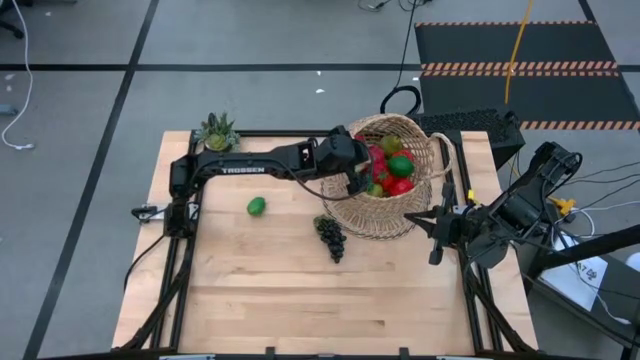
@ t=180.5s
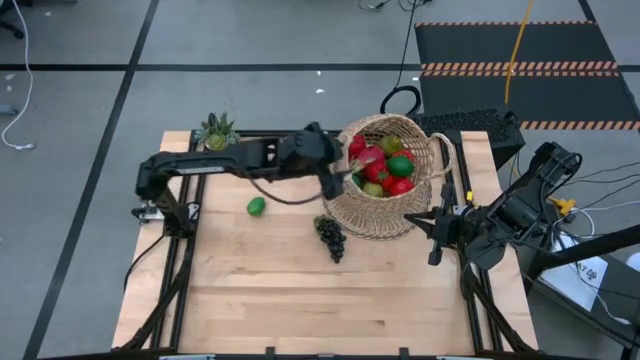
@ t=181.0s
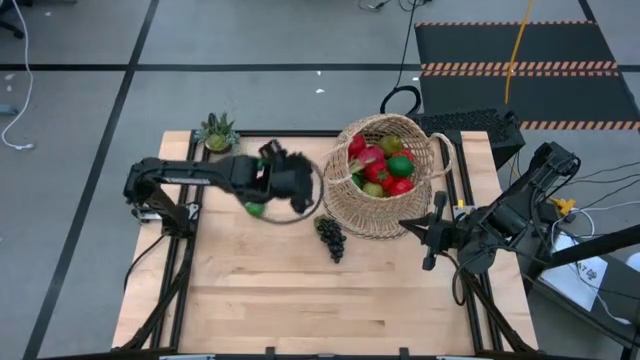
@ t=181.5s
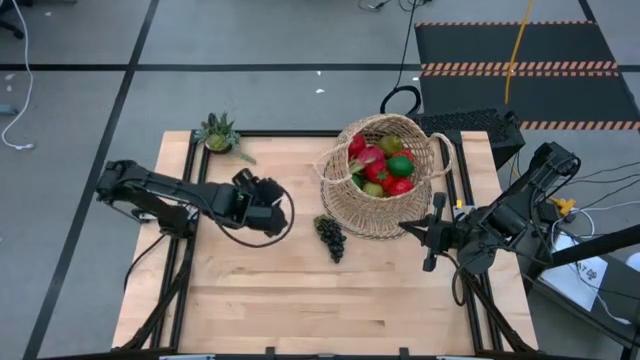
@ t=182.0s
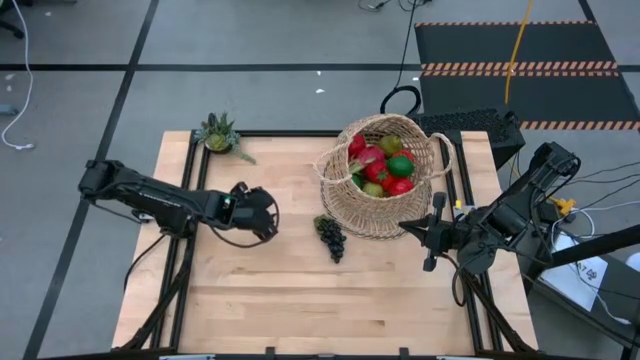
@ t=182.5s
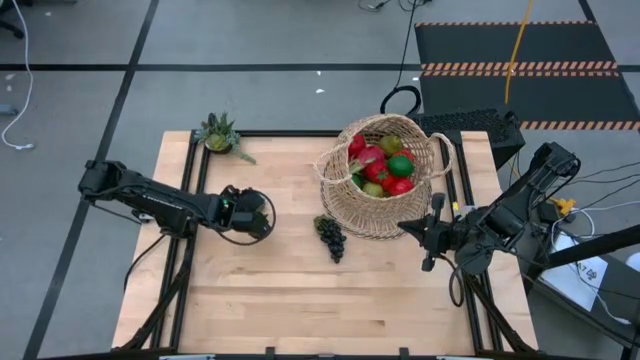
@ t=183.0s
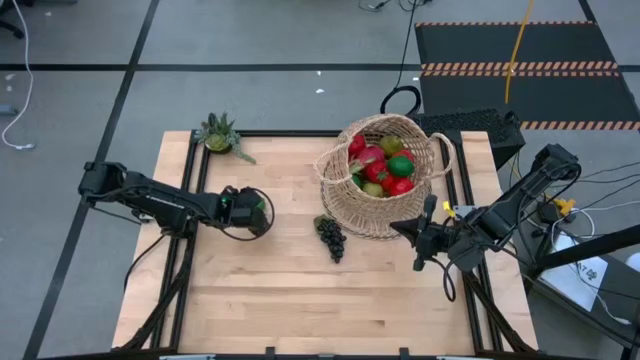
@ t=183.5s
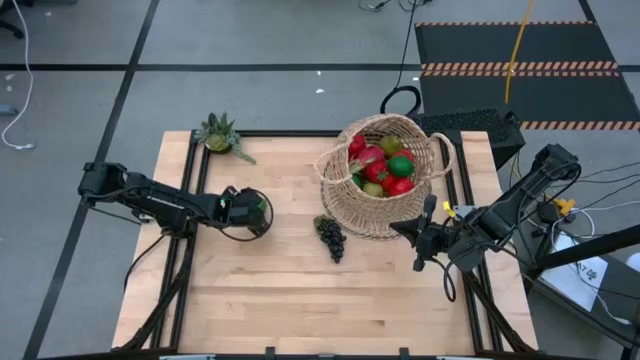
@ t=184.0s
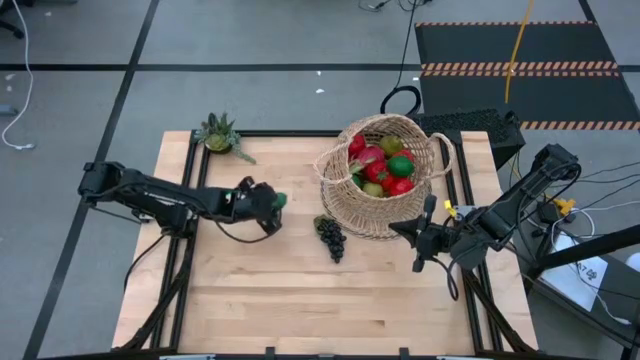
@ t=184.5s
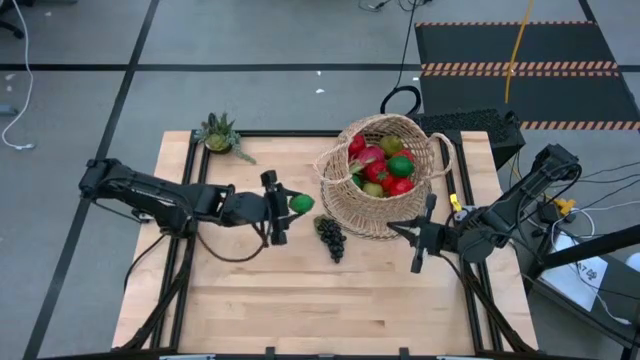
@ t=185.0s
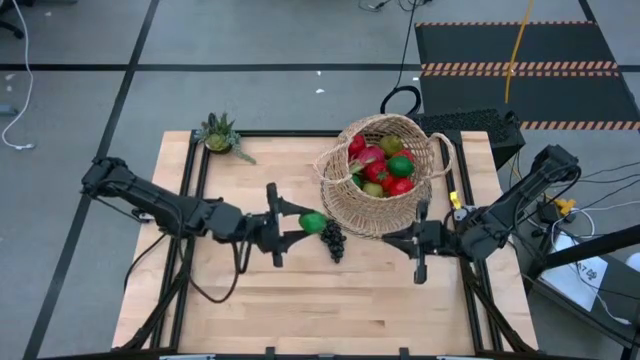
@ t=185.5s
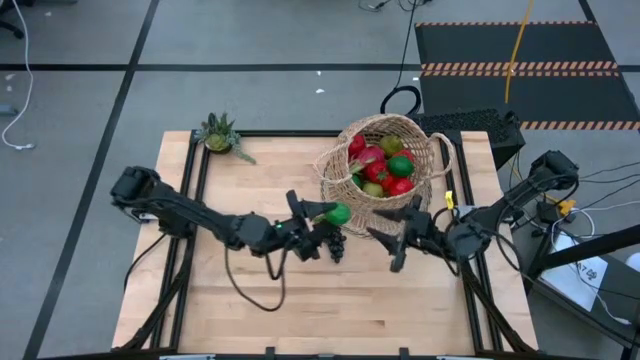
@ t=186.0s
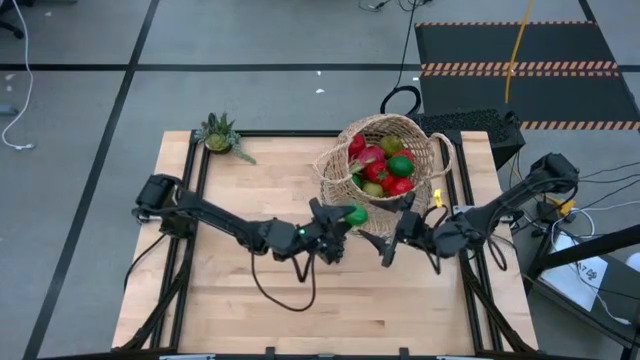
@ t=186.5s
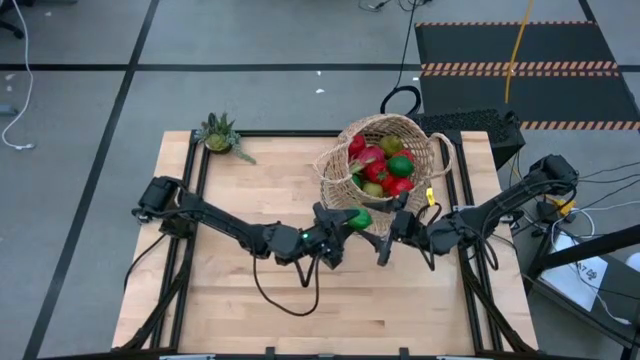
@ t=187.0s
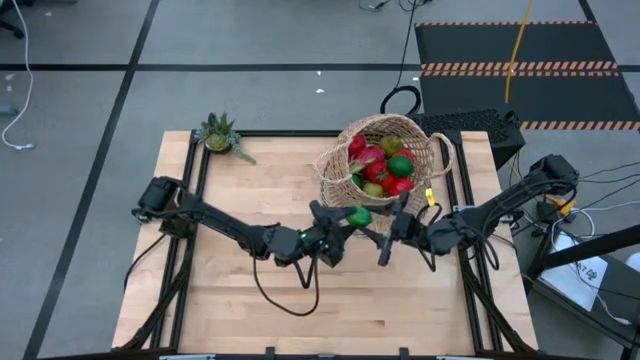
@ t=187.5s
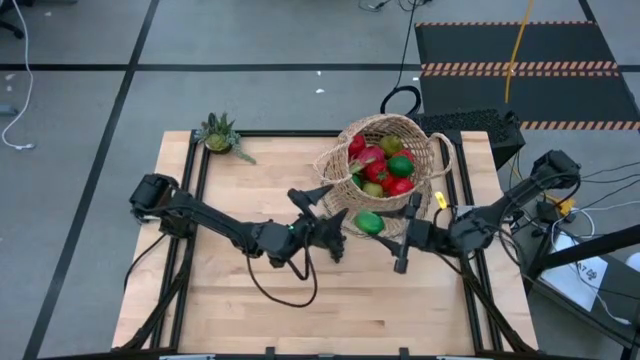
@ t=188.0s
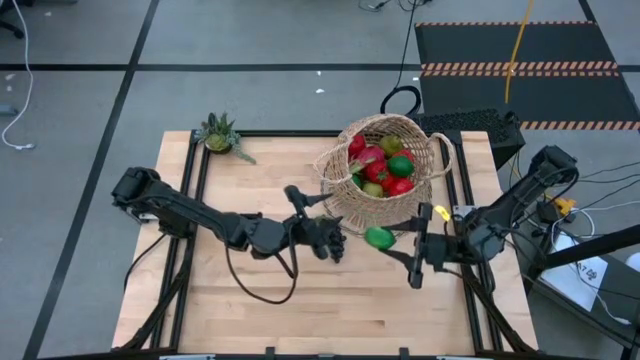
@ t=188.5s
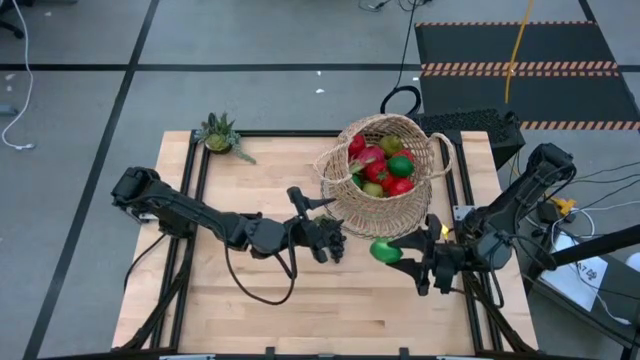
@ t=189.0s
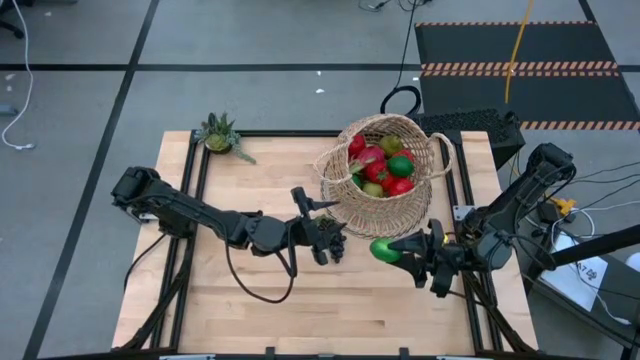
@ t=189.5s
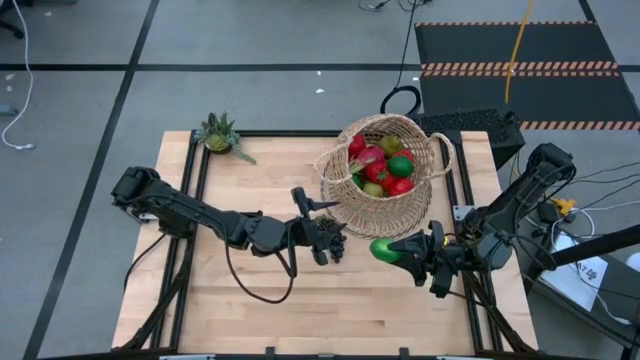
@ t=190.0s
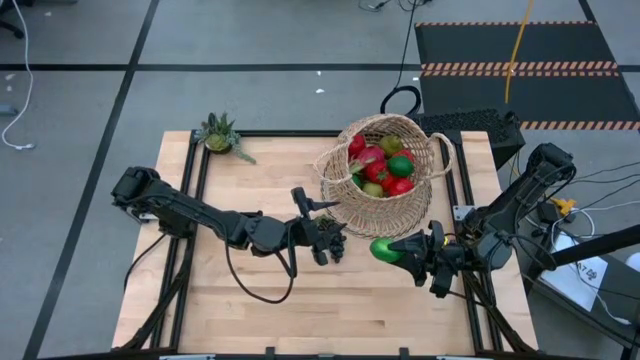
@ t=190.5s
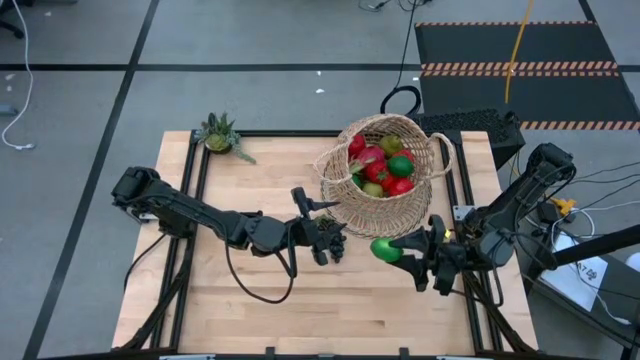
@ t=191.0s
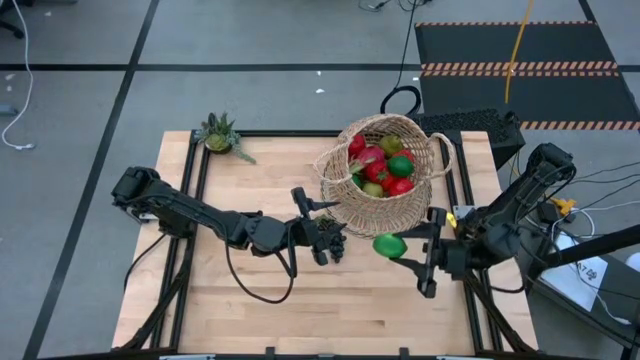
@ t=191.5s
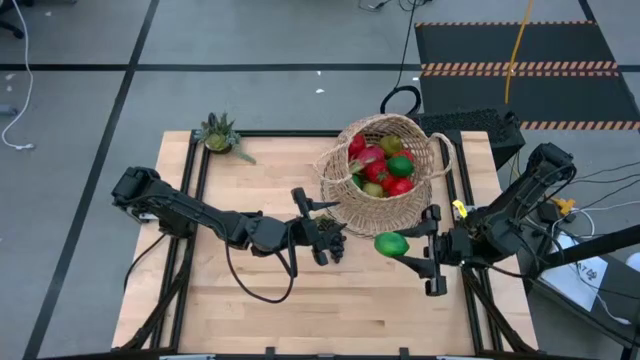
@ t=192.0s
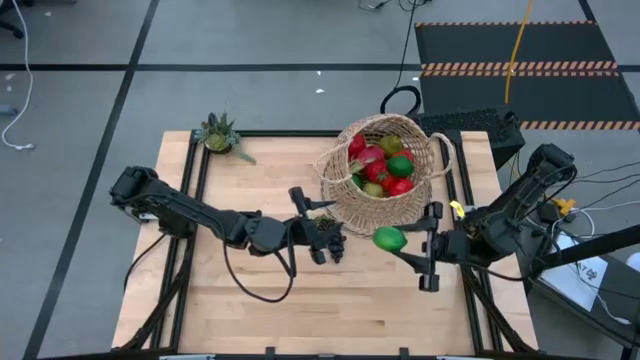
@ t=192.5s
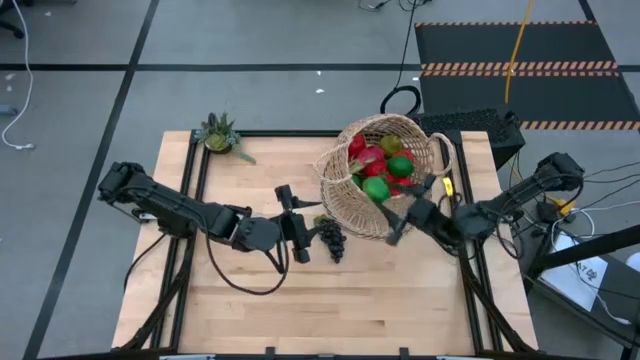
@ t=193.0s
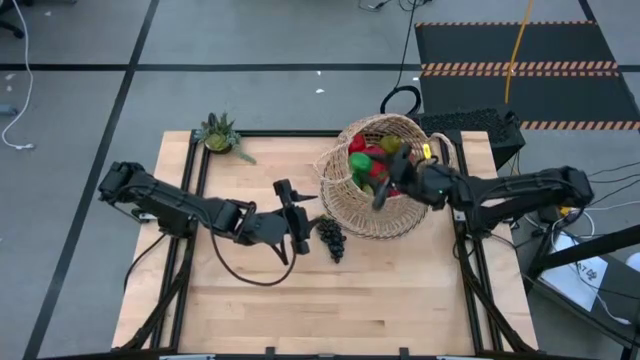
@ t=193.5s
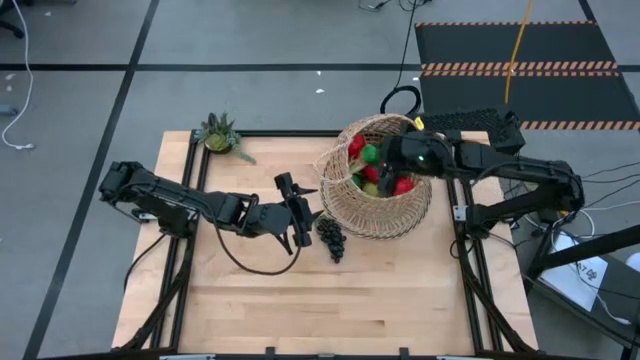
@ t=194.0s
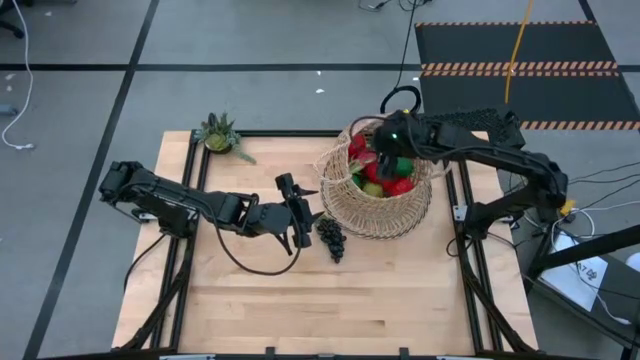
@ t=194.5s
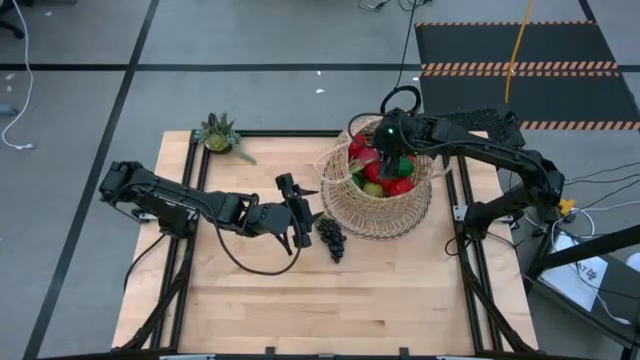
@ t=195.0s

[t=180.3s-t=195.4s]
Task: Build produce basket
Put the green lime into the brown basket

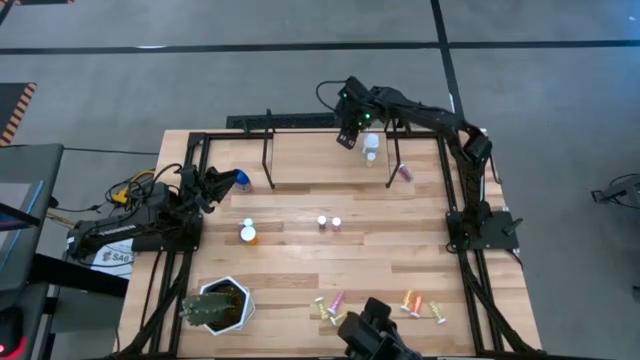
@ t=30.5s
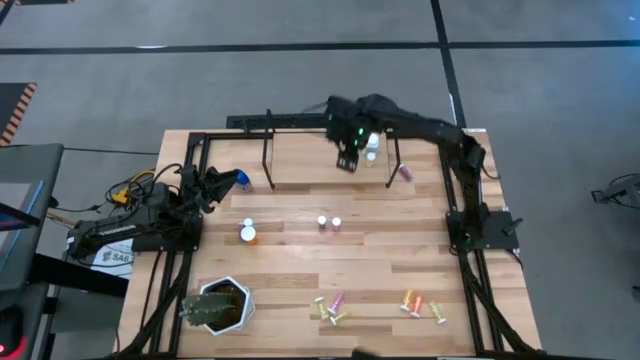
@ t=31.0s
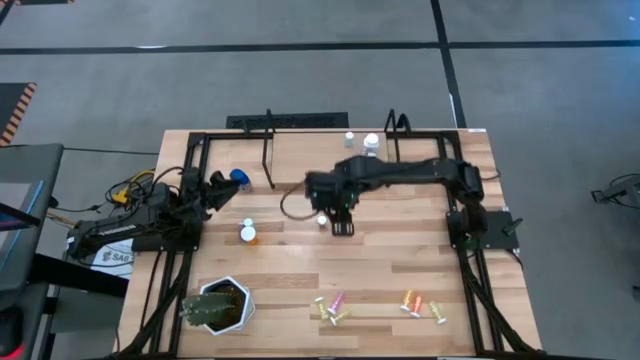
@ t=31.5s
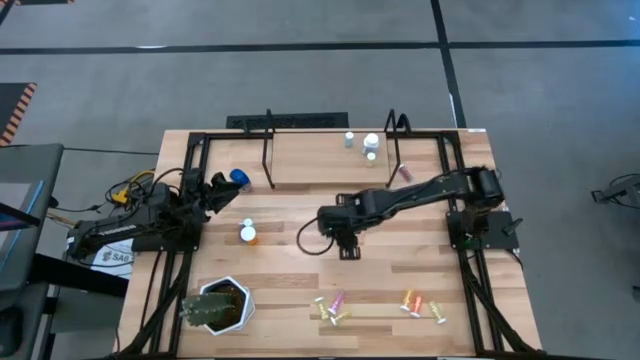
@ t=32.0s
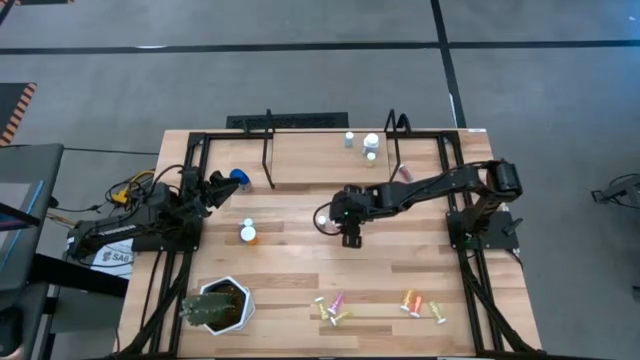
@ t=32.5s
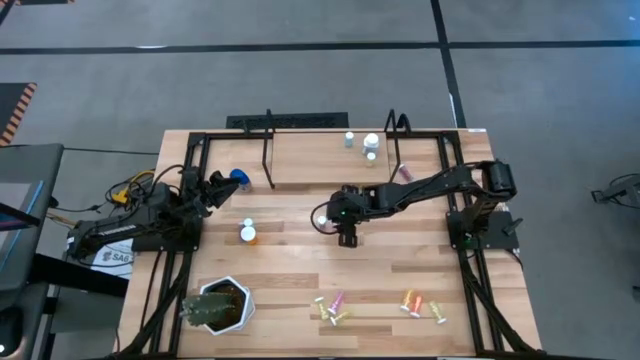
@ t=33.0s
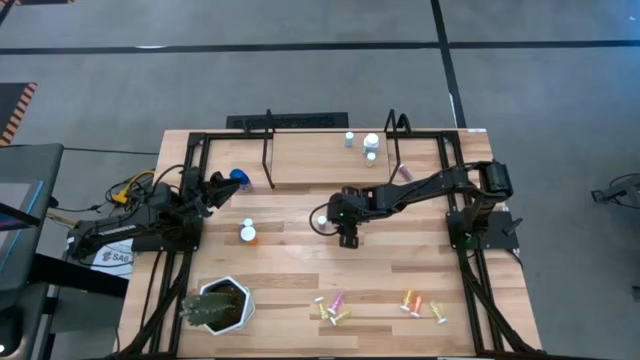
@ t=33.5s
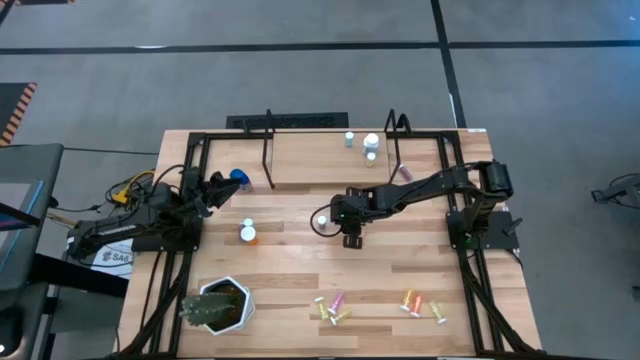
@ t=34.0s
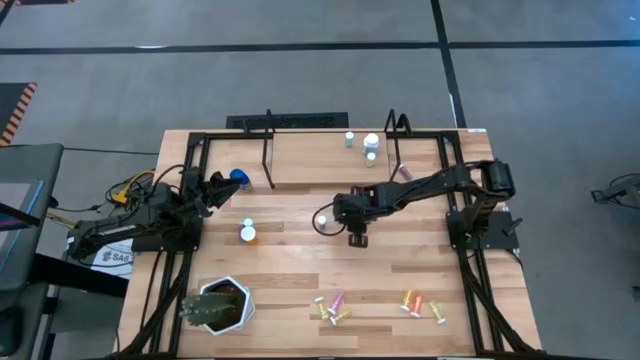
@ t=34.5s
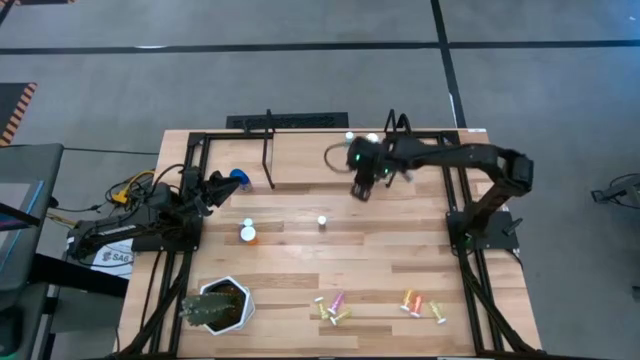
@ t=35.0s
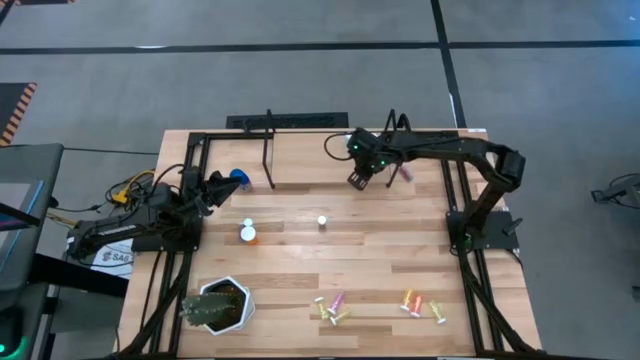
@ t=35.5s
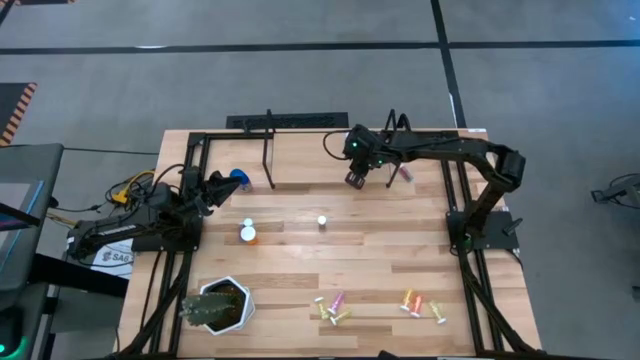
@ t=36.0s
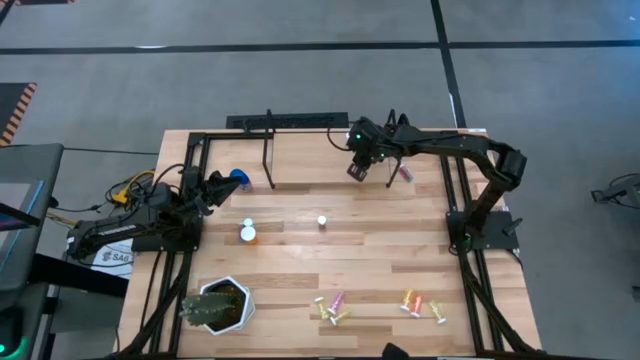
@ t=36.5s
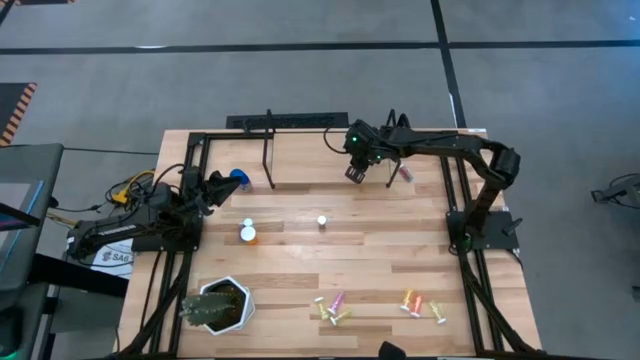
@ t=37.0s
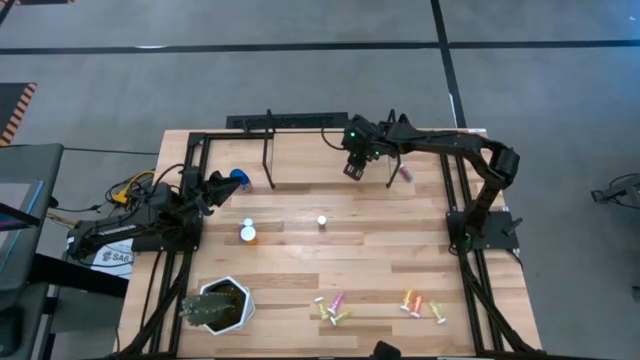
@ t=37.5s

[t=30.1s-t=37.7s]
Task: Pick and place medicine bottles onto shelf by color
Put the pink pill bottle on the shelf
